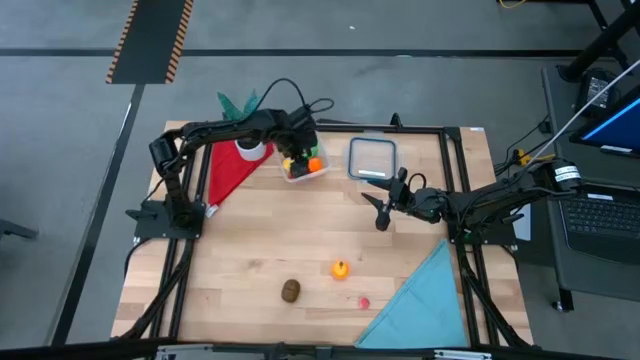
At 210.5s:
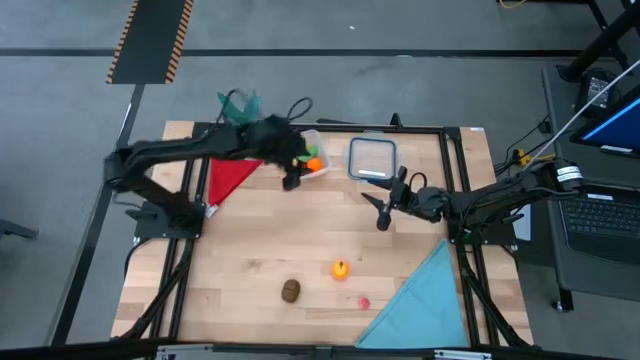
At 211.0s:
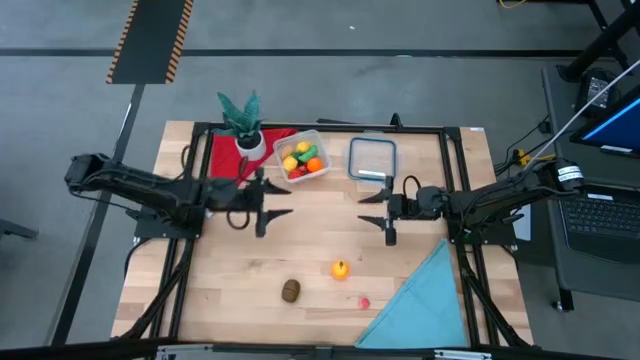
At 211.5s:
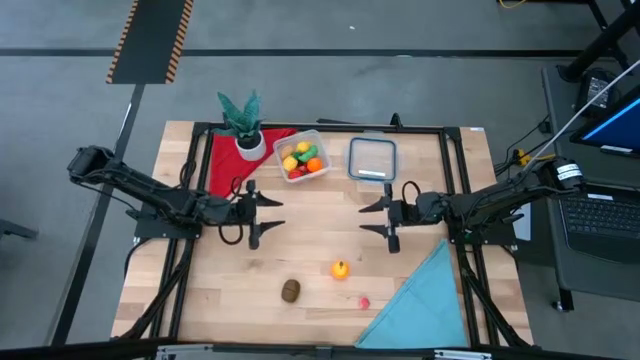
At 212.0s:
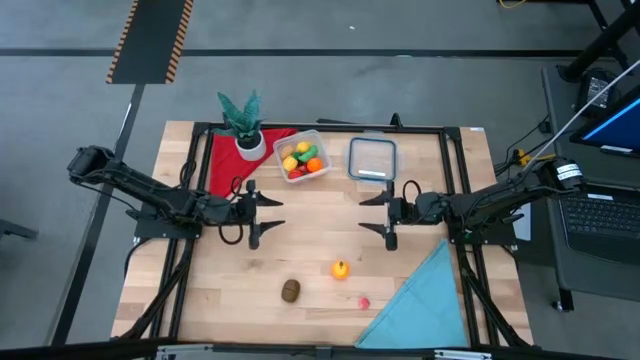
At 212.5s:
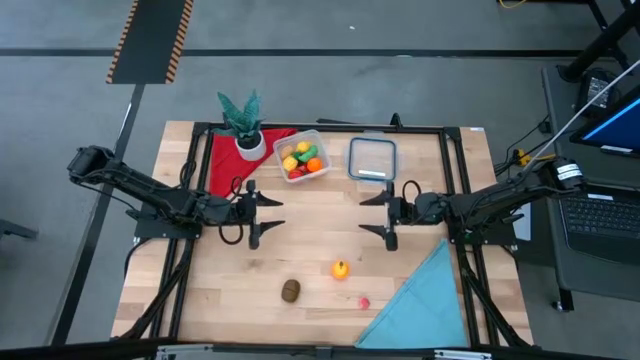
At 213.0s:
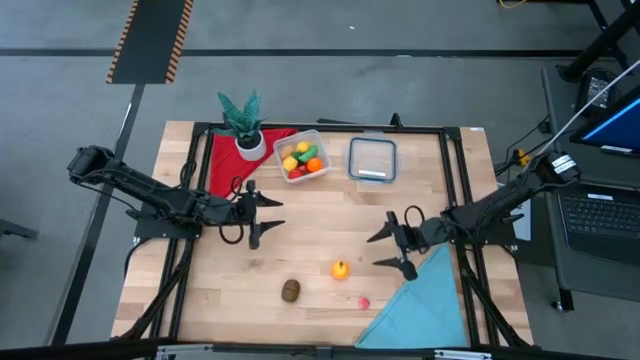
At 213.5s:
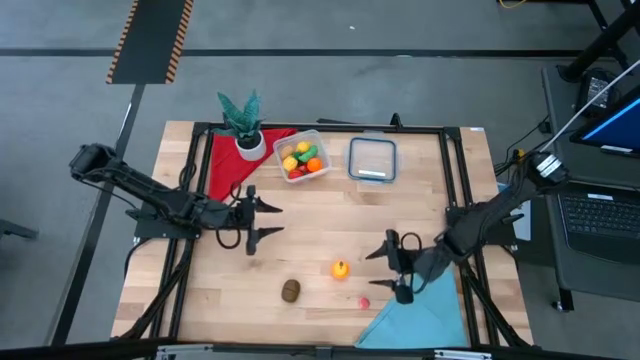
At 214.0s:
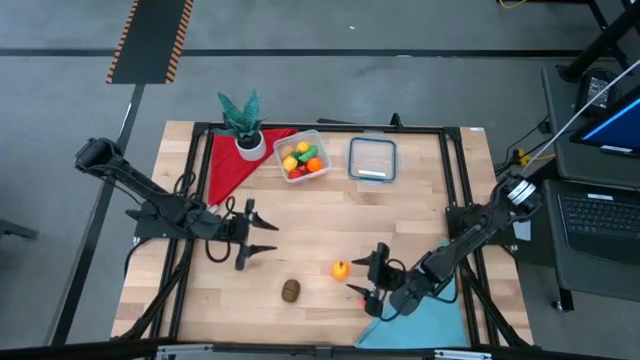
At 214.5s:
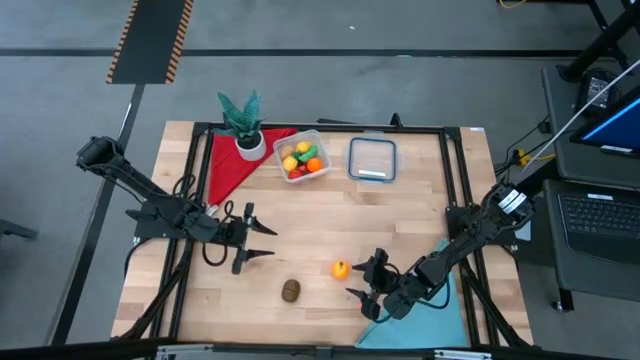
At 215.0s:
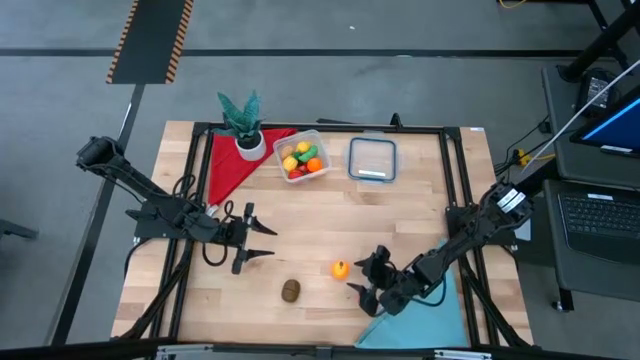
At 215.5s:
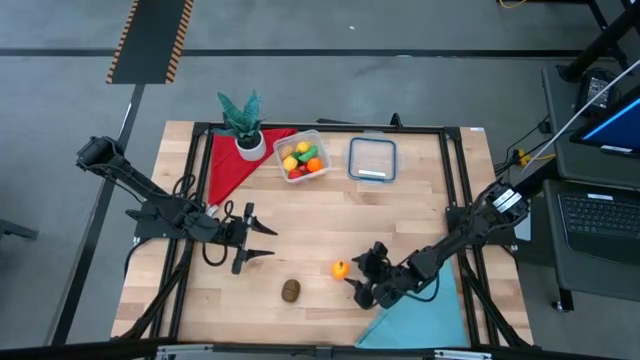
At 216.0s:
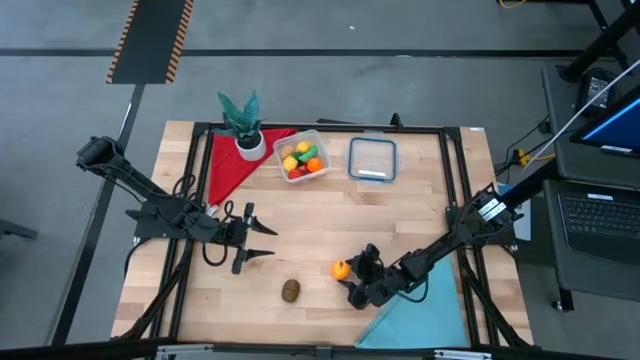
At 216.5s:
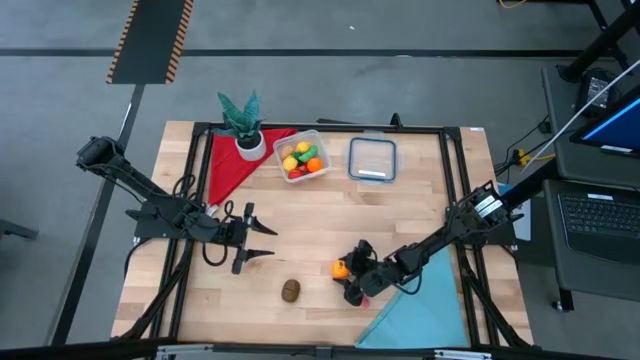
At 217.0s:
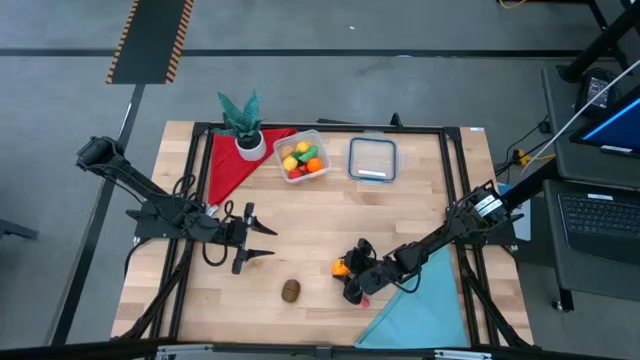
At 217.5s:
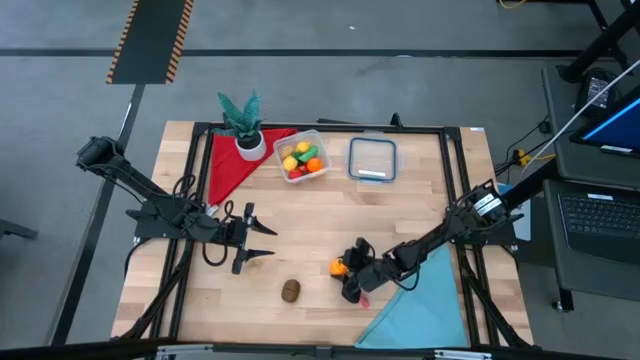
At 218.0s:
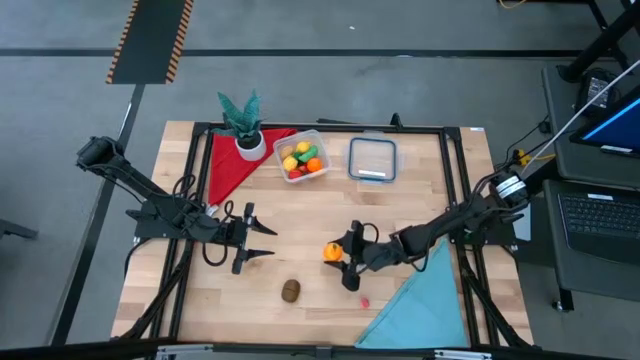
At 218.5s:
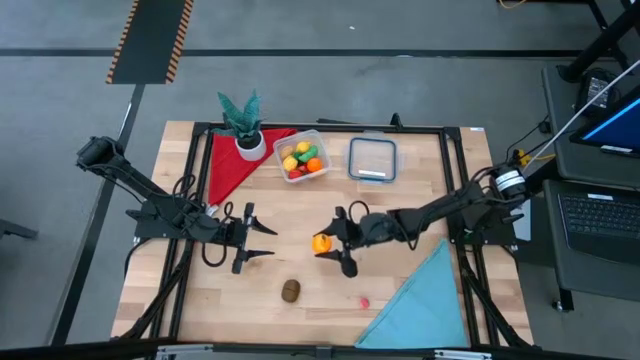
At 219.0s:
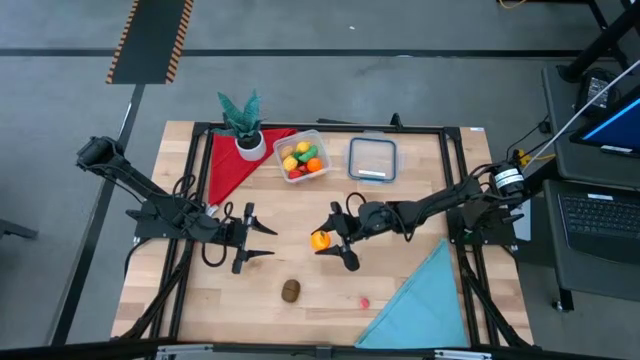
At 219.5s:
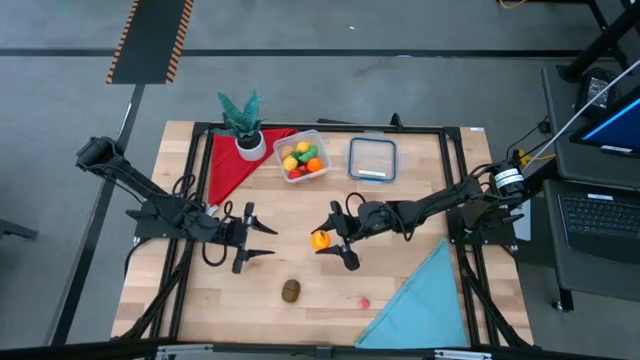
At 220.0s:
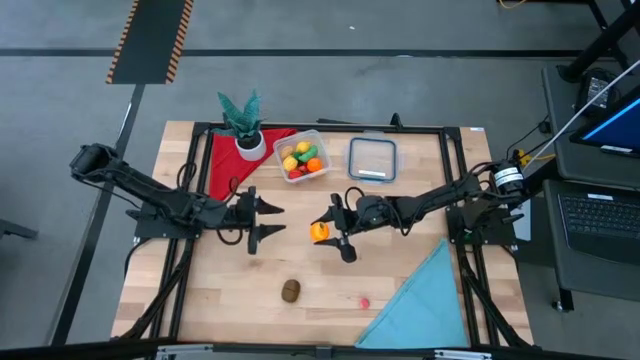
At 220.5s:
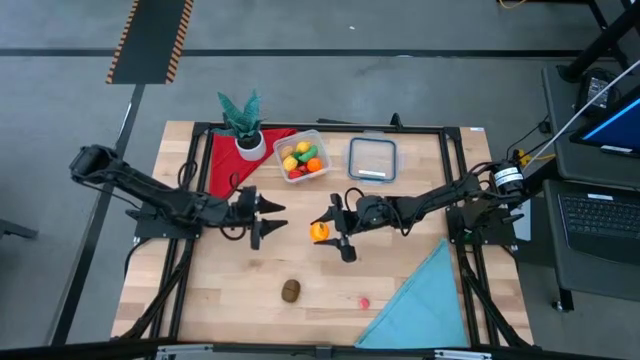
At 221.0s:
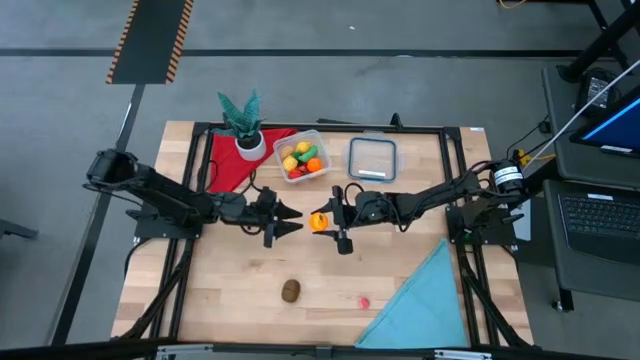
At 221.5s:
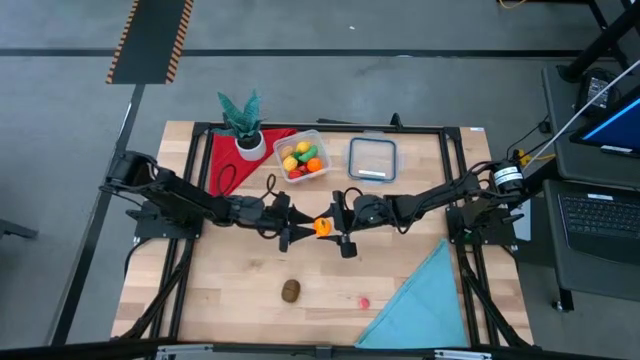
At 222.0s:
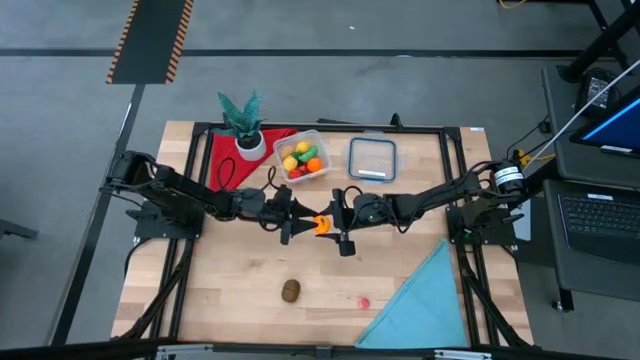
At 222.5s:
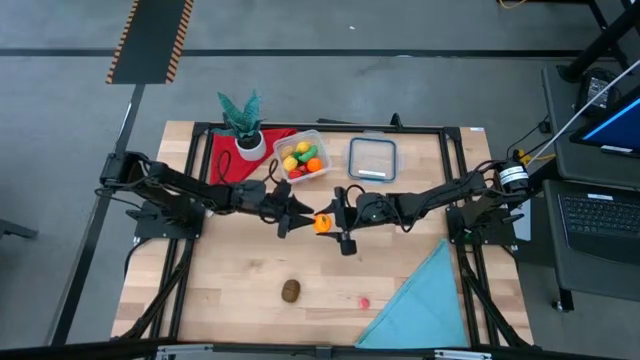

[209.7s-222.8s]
Task: Pick and placing Produce into tupperware
Put the orange into the transparent bin

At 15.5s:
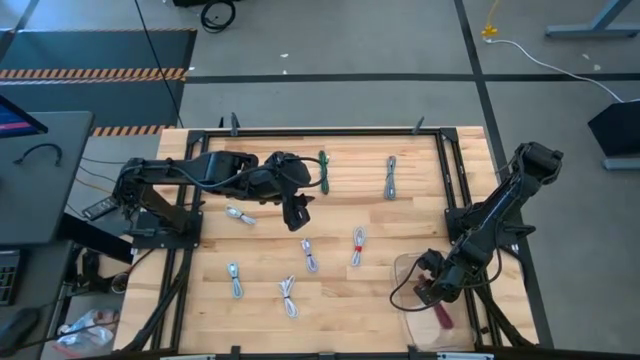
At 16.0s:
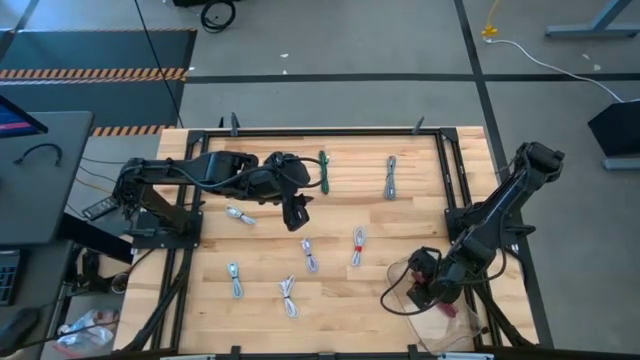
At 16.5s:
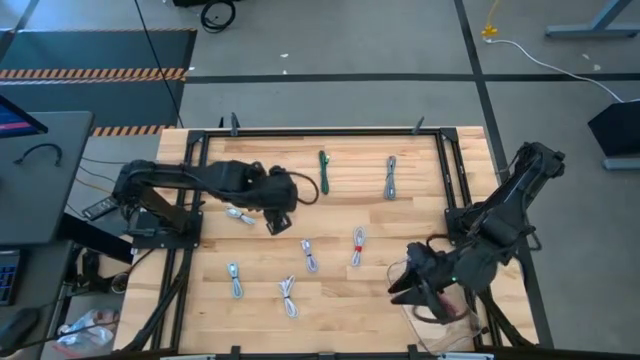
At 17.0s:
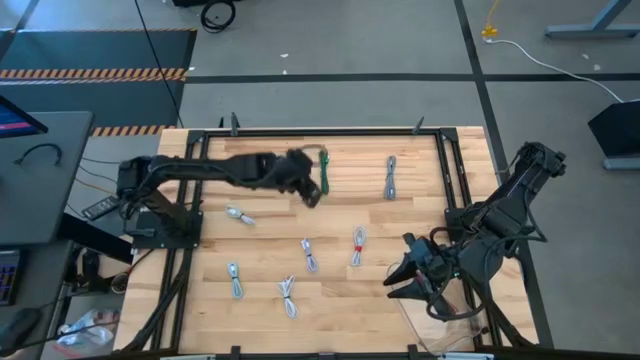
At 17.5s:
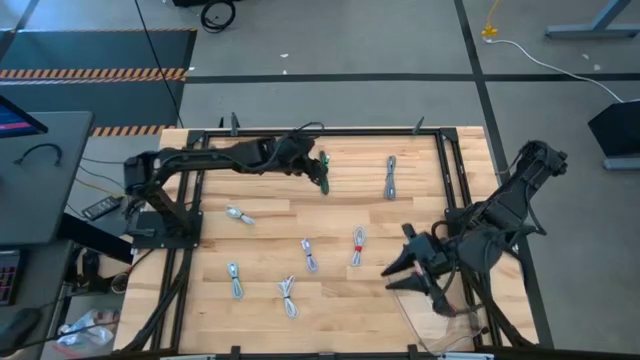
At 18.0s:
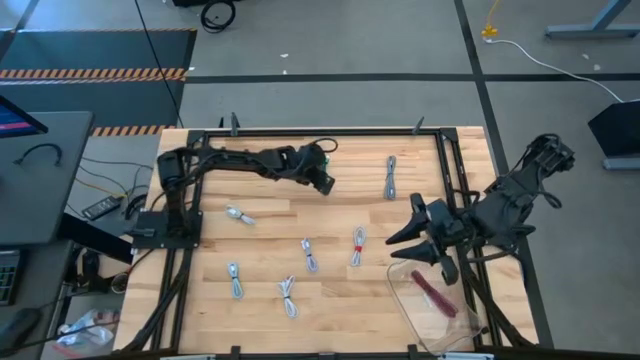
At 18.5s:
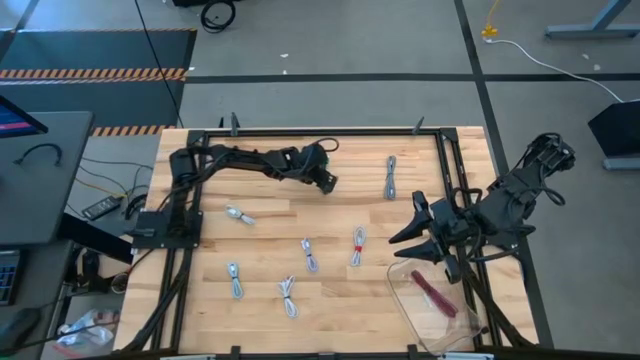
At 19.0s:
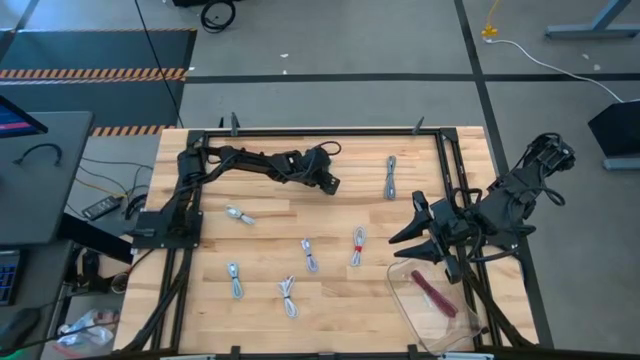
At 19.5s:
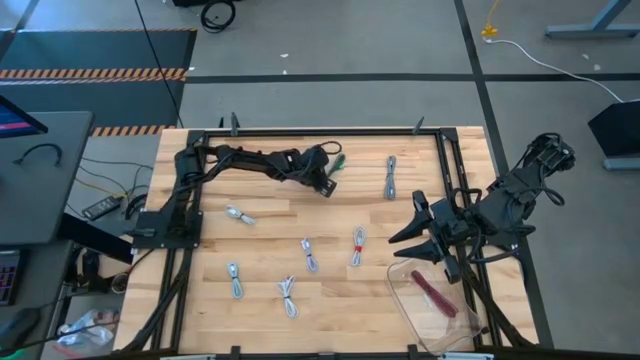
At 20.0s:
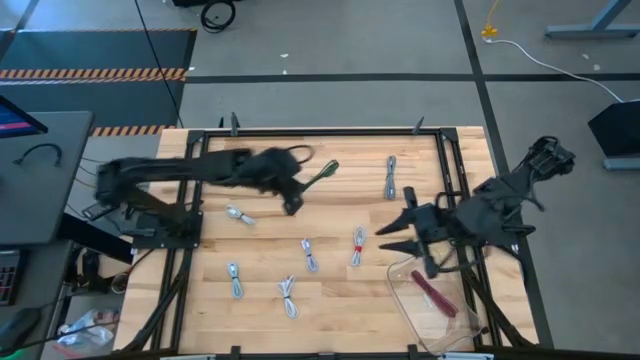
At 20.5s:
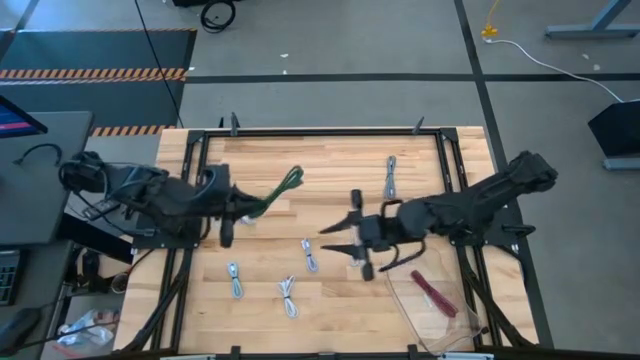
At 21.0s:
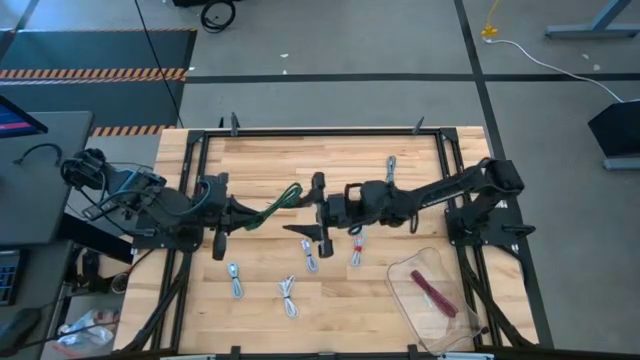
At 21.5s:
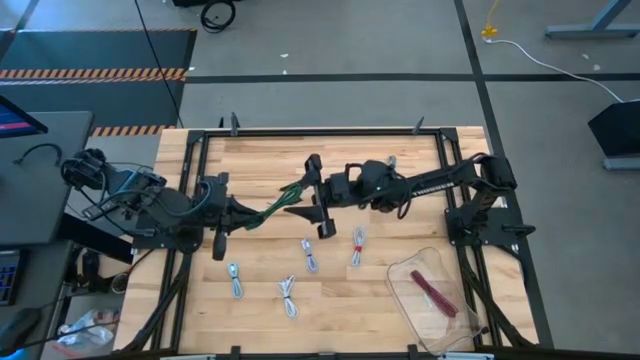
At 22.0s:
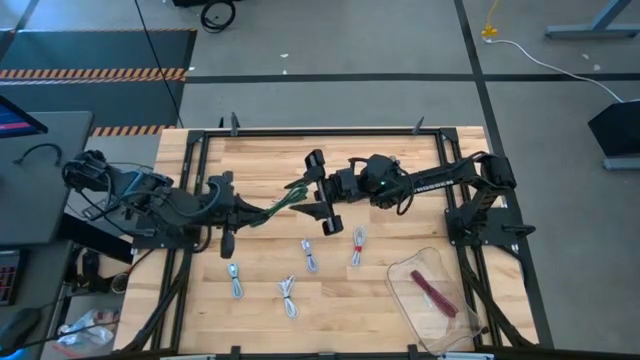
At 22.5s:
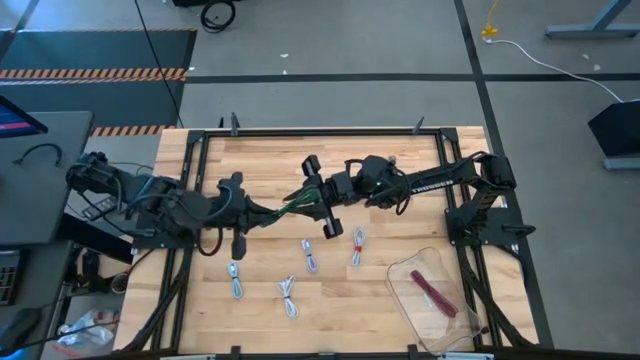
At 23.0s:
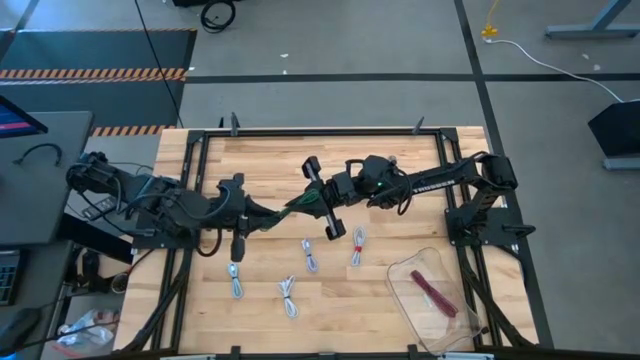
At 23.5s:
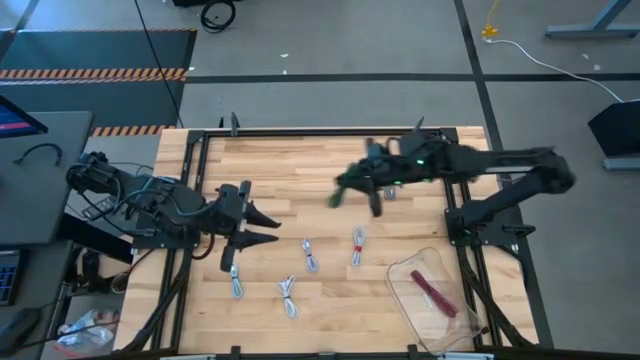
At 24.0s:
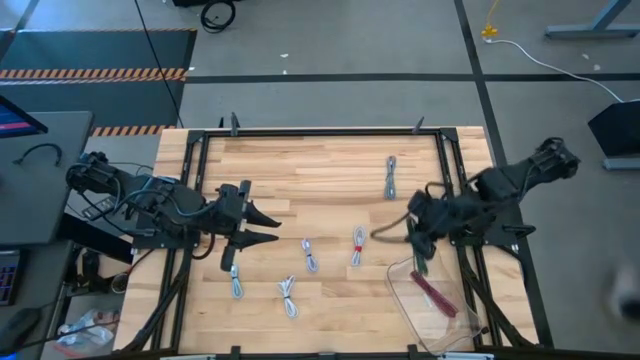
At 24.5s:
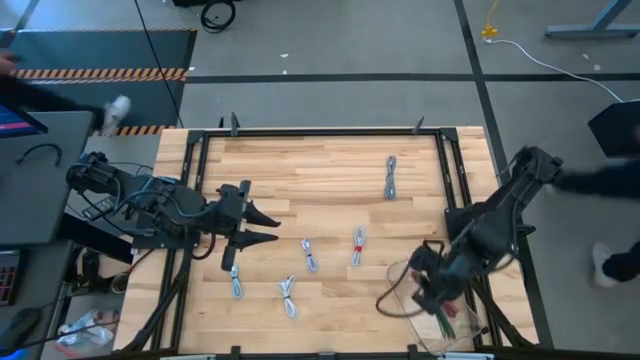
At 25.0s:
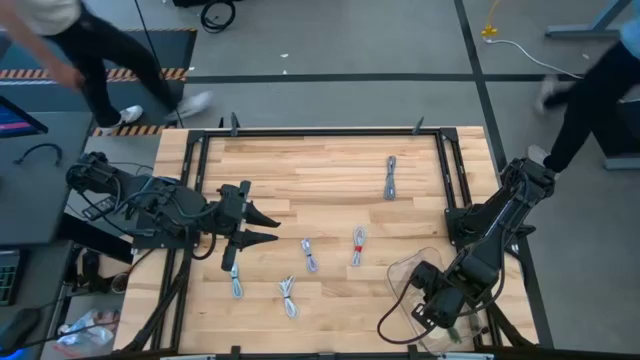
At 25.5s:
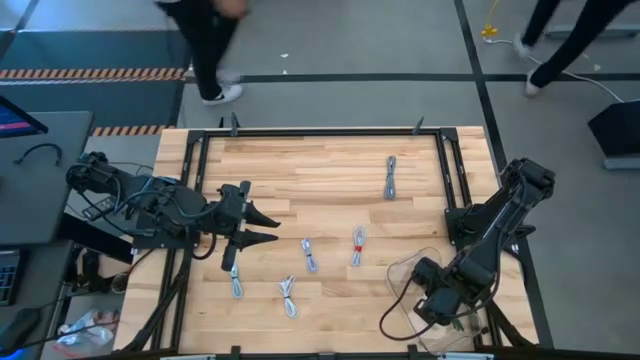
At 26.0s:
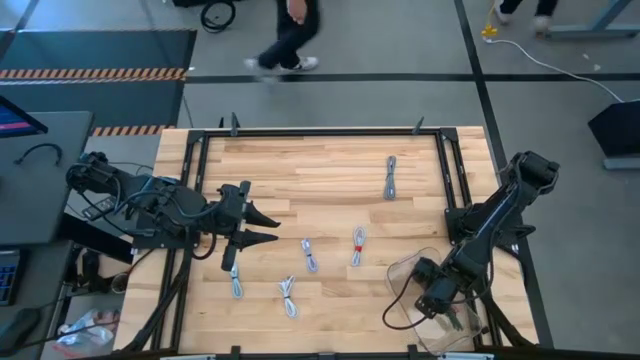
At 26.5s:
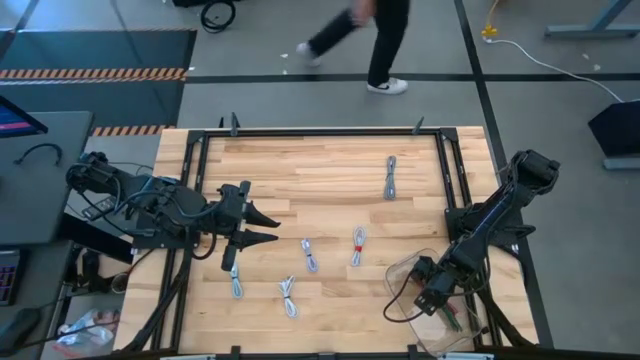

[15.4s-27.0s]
Task: Pick and place USB-C Cables
Put the green charger cable into the transparent bin
